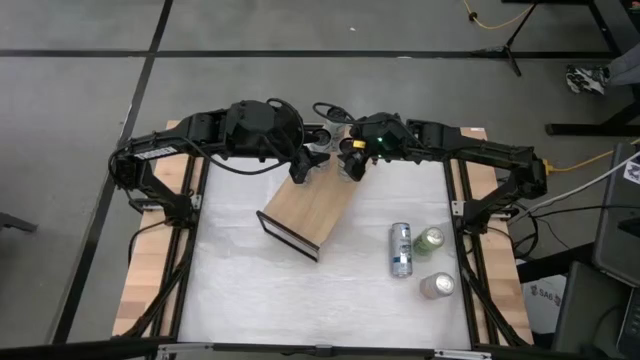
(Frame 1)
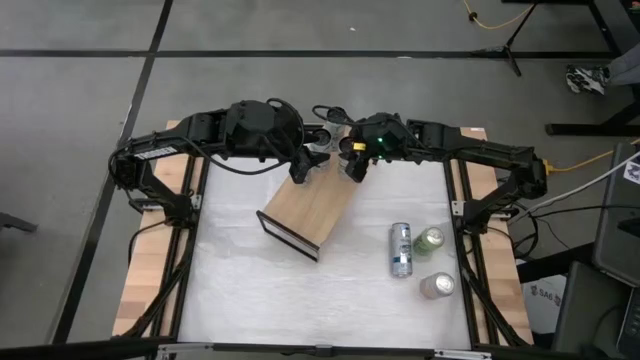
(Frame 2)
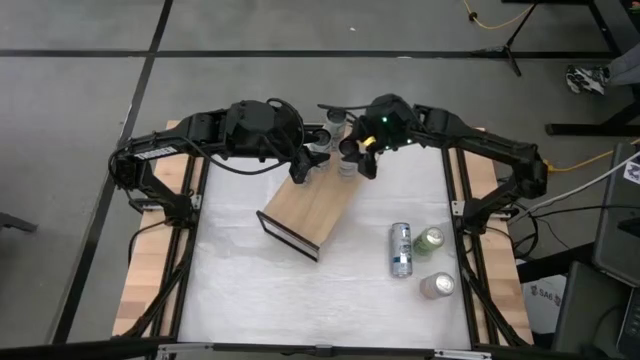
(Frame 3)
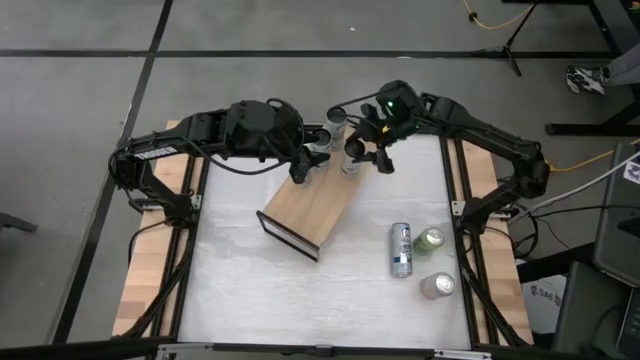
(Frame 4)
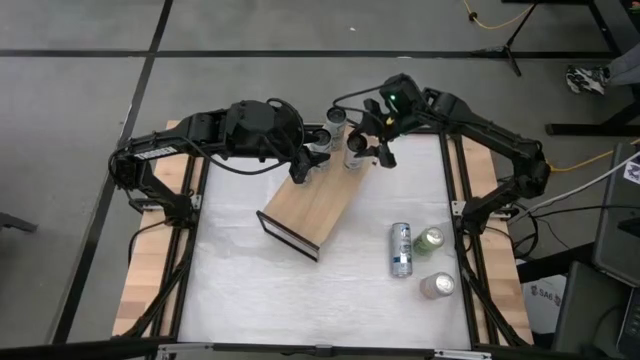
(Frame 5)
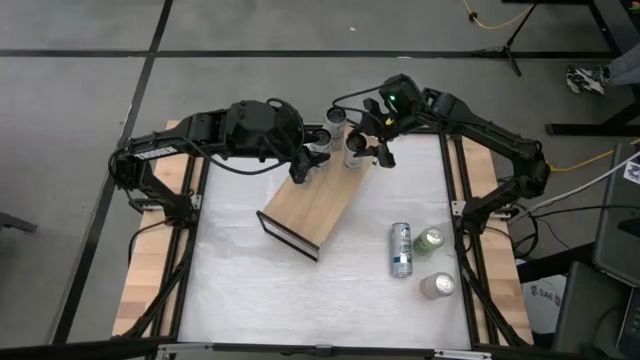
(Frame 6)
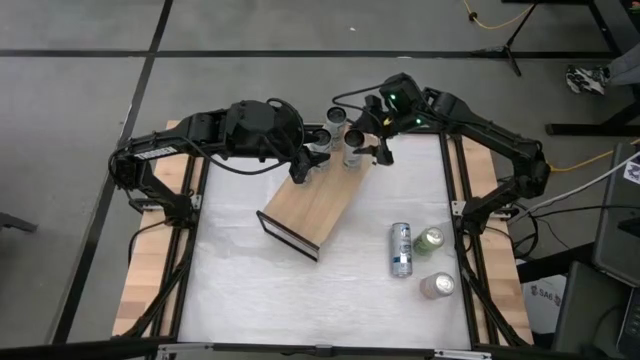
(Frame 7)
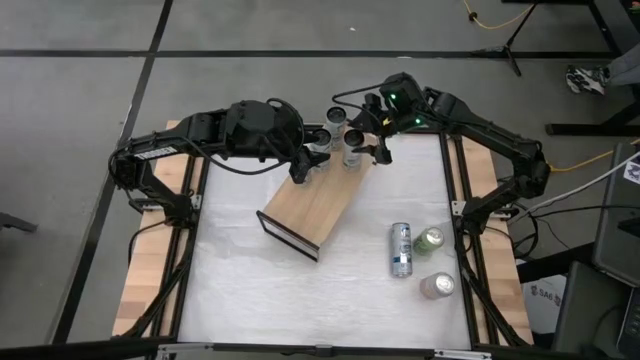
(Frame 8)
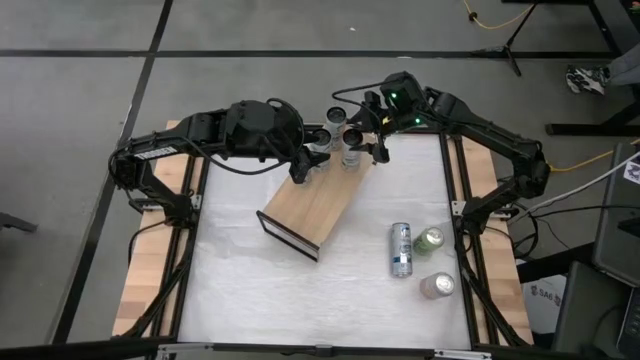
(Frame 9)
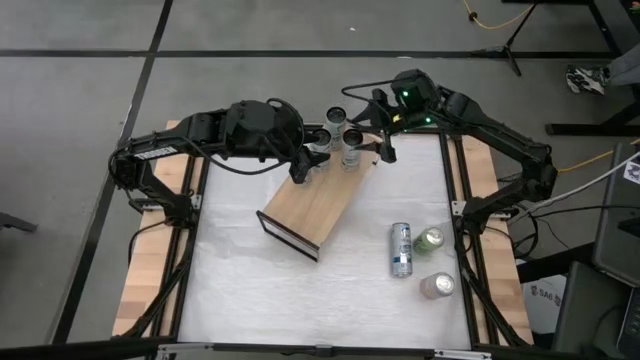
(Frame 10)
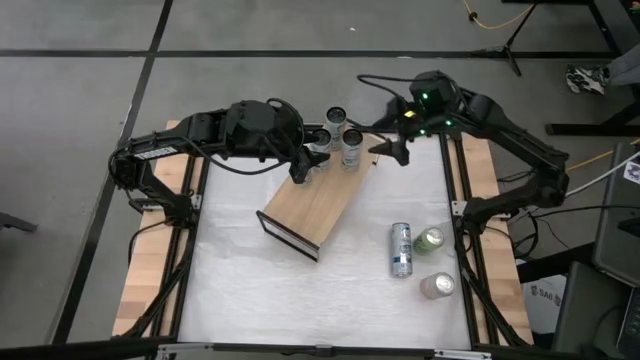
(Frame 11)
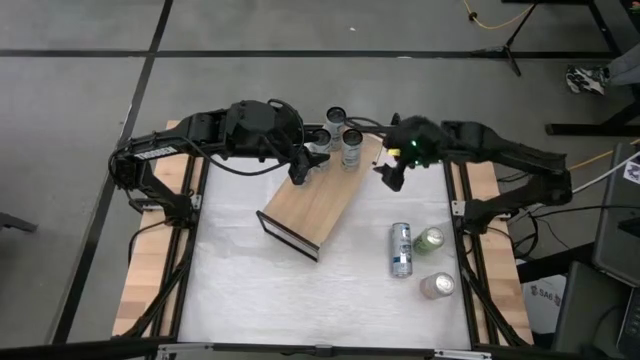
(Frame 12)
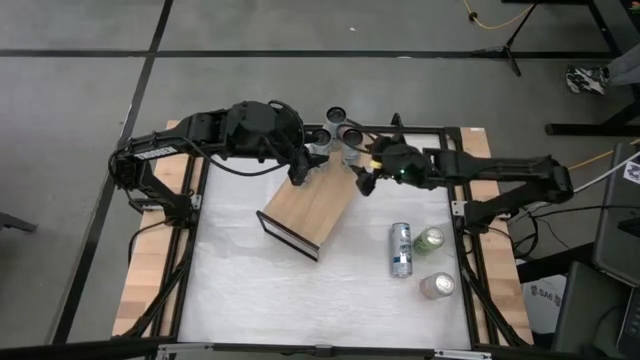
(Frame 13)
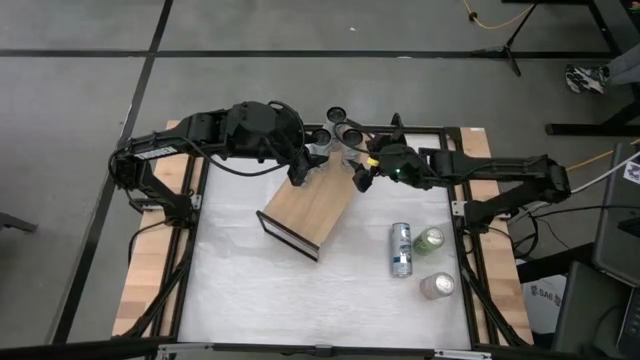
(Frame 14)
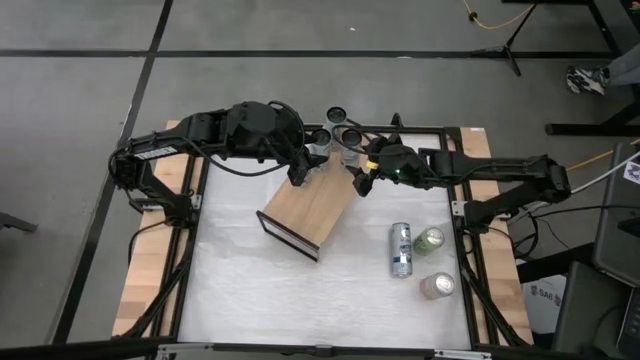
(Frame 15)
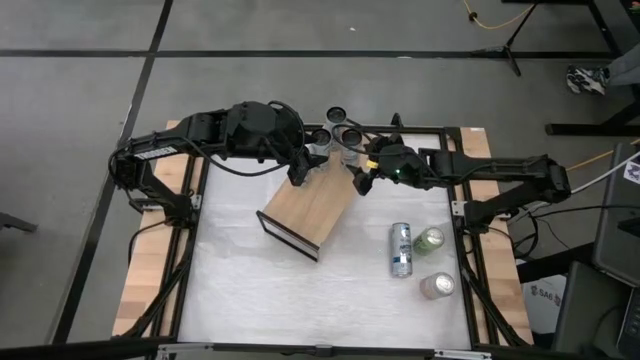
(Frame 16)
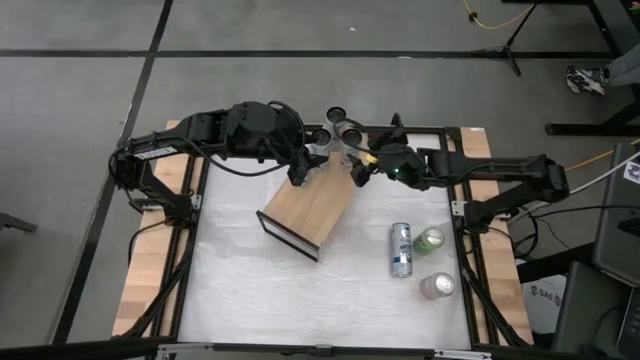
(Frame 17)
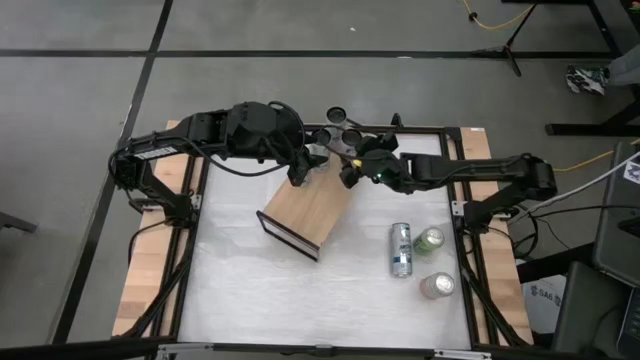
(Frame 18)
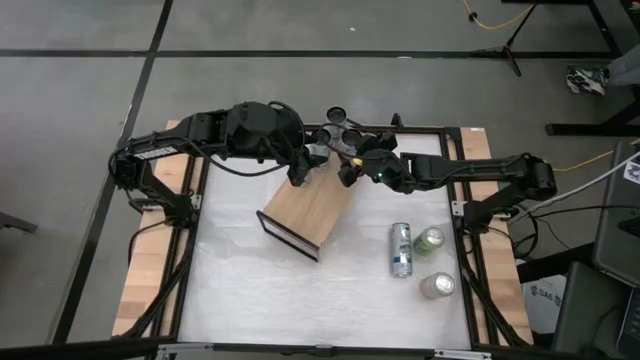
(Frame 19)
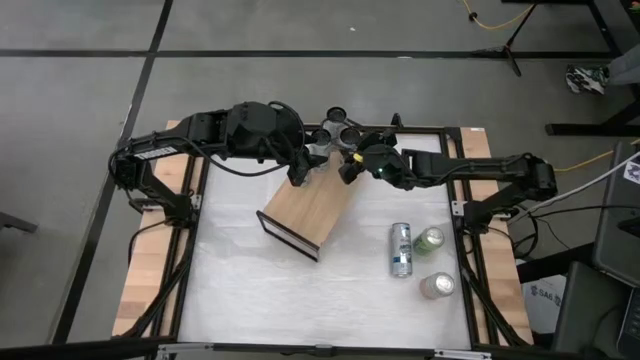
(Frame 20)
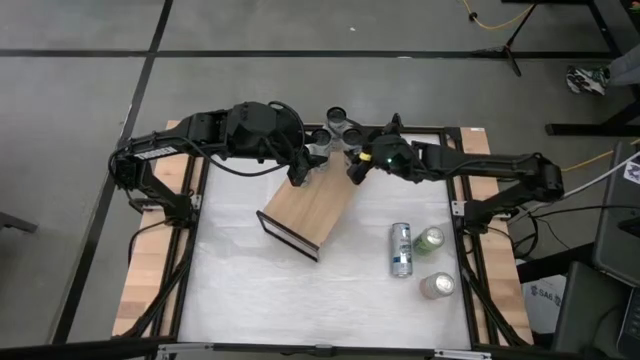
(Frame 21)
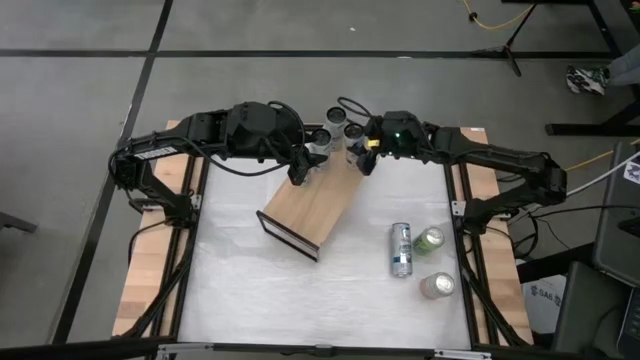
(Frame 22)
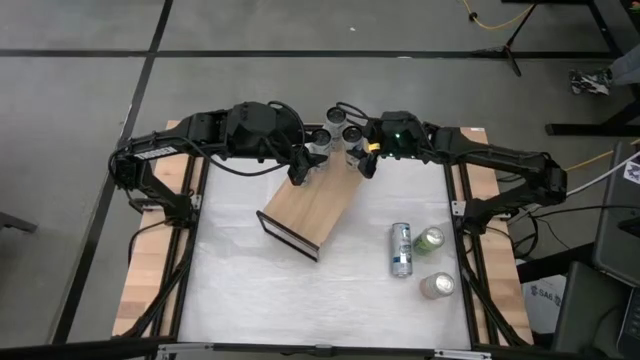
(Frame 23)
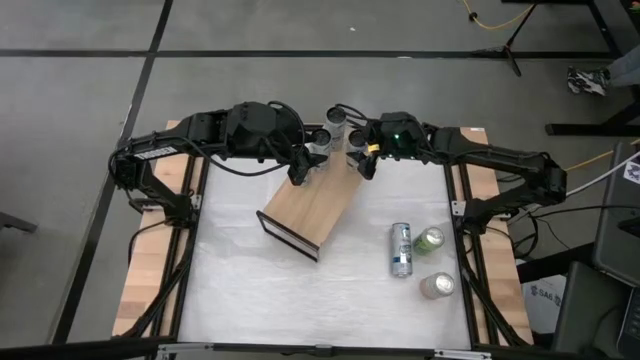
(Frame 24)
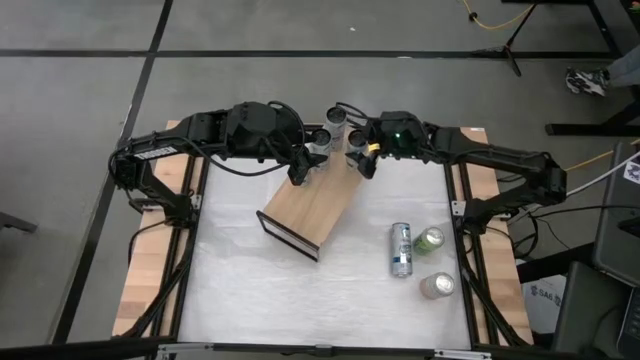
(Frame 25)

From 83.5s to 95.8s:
Task: Place canned beverage on shelf
Adjust the soda can on the shelf
